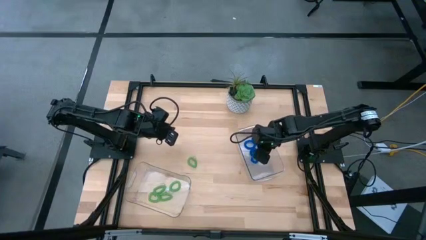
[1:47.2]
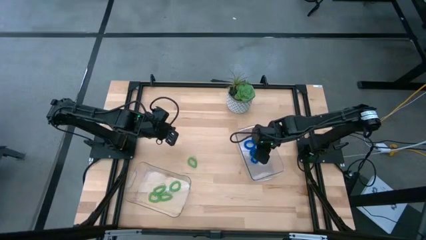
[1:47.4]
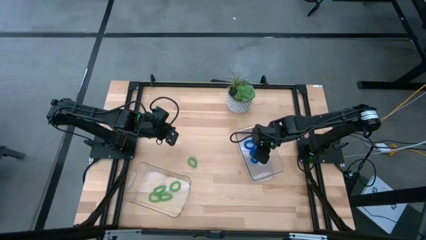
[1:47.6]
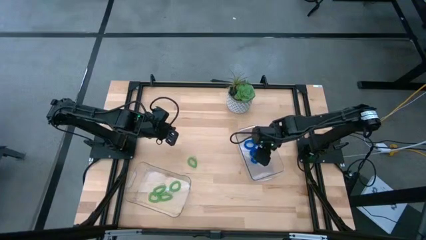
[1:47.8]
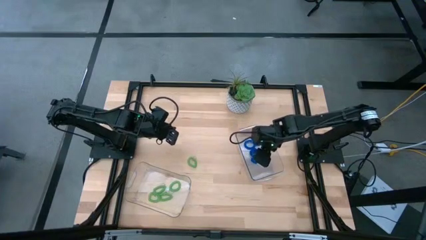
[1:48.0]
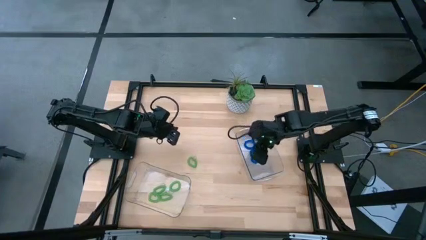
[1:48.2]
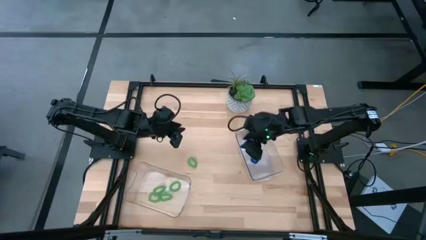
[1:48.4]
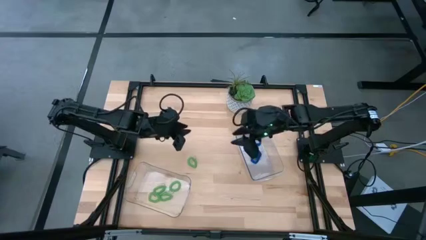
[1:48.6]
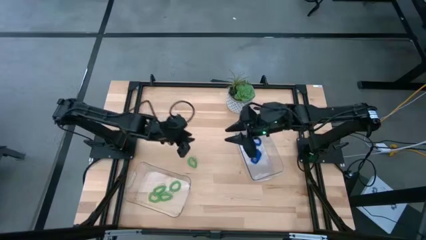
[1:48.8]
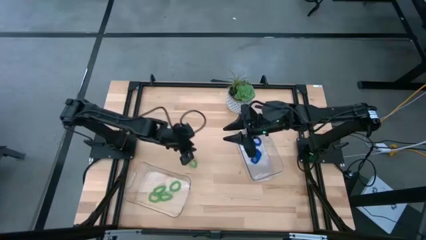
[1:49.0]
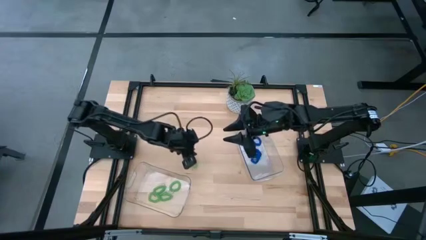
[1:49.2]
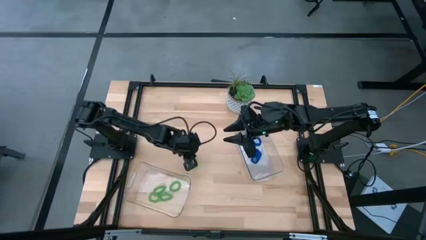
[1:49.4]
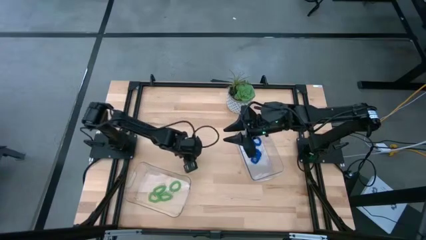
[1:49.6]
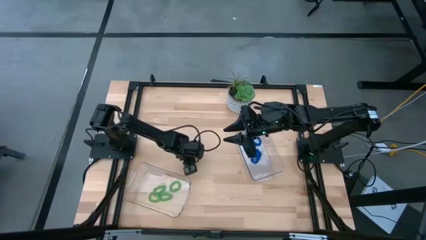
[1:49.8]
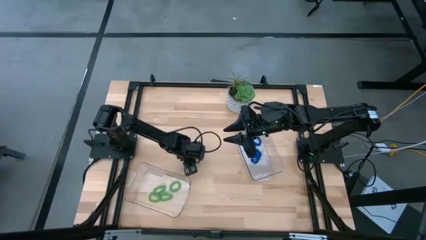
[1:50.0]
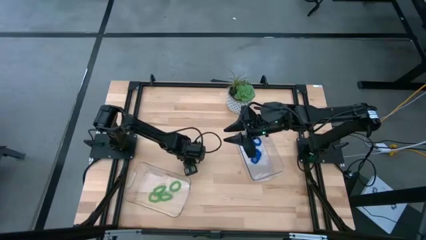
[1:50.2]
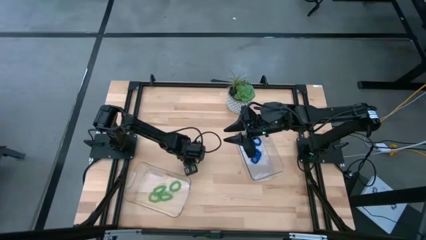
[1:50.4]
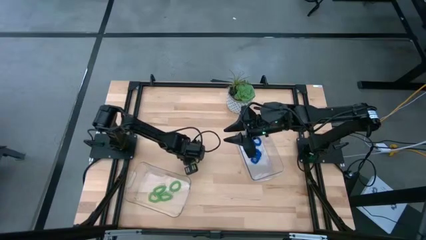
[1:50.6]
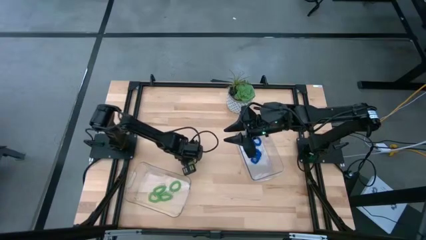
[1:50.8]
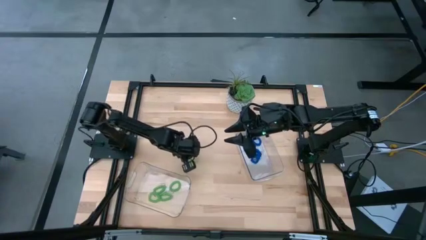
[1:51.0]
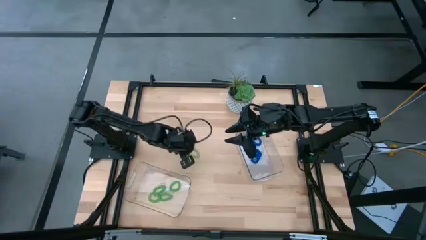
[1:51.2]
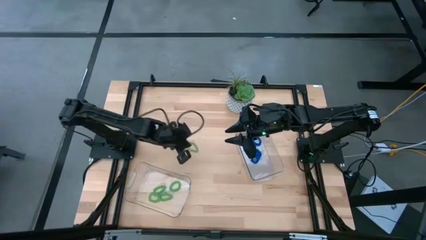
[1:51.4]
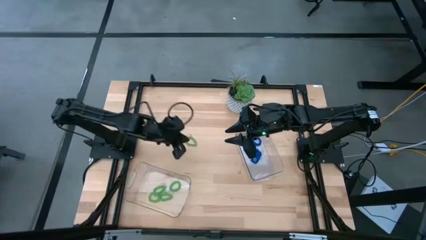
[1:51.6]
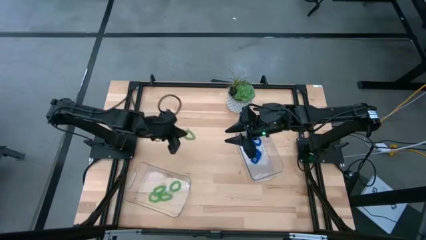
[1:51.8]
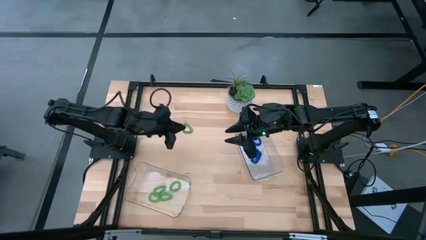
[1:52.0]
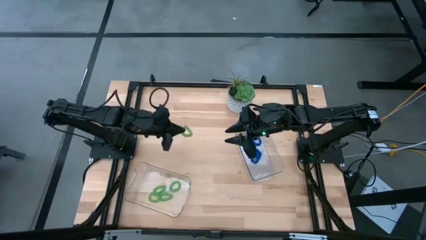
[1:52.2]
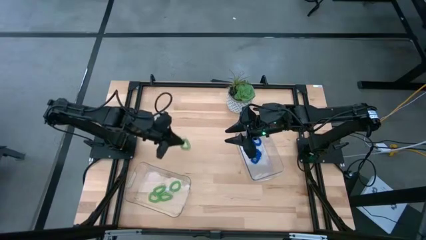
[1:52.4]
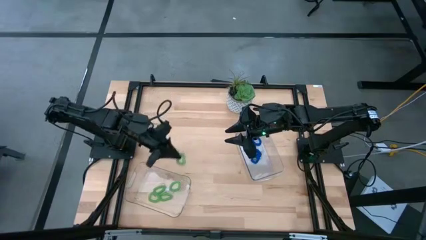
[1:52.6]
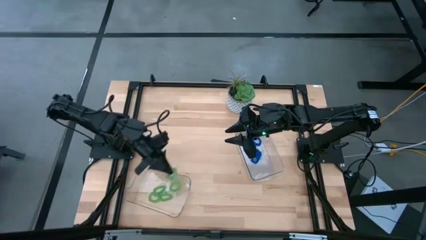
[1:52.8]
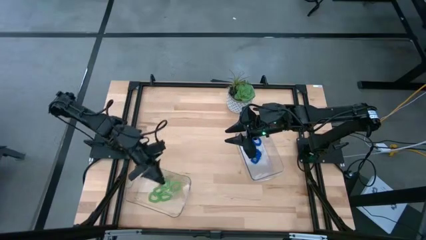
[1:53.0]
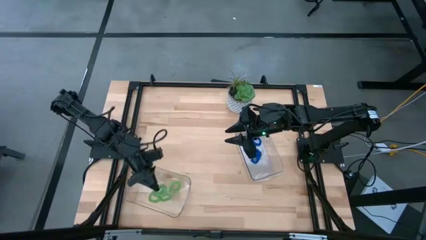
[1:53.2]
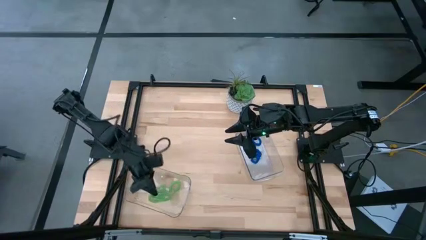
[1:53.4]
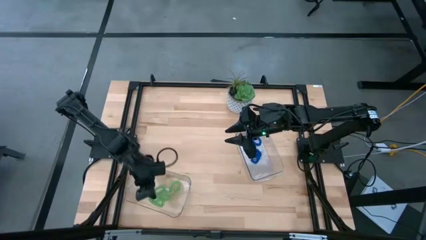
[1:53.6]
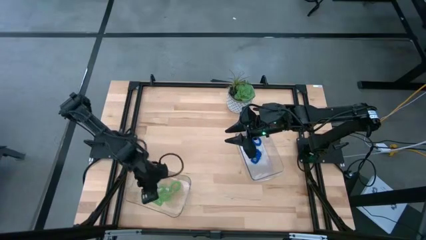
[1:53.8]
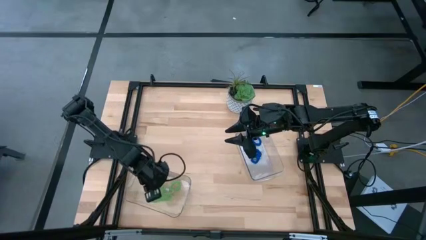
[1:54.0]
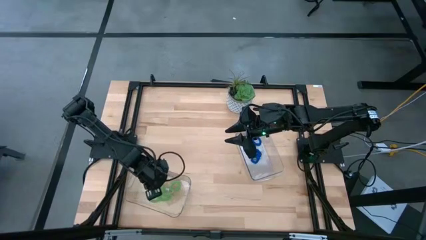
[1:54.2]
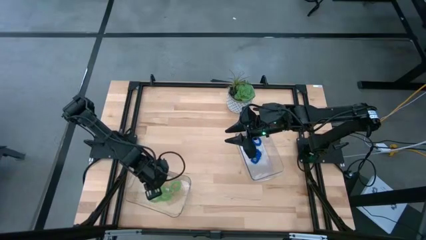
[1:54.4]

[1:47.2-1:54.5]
Task: Sort spring keychains
Put the green spring keychain into the left transparent bin

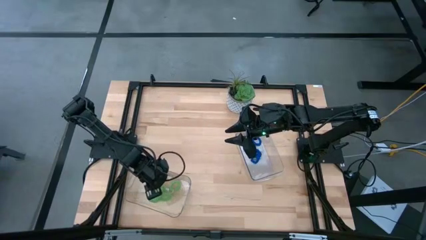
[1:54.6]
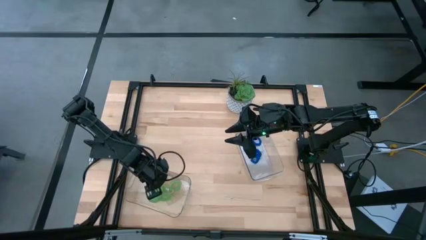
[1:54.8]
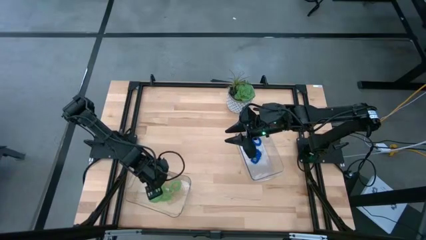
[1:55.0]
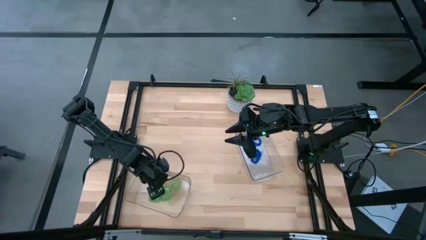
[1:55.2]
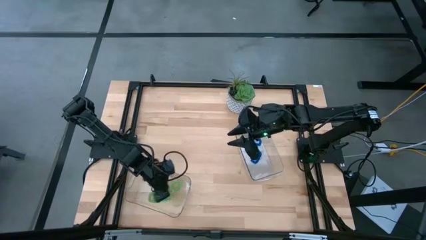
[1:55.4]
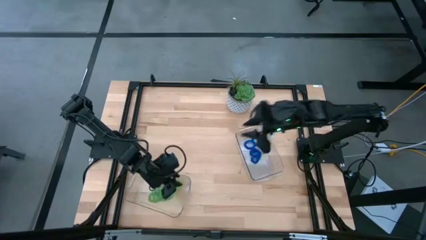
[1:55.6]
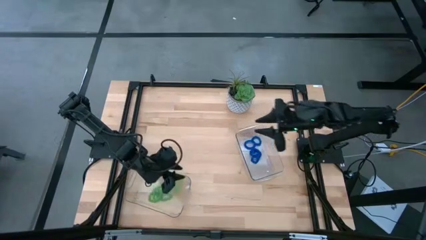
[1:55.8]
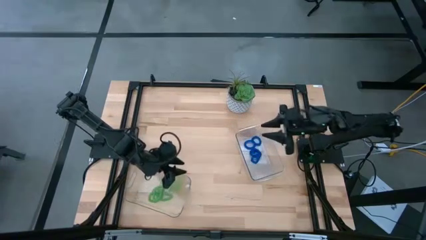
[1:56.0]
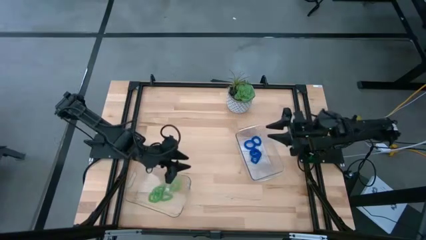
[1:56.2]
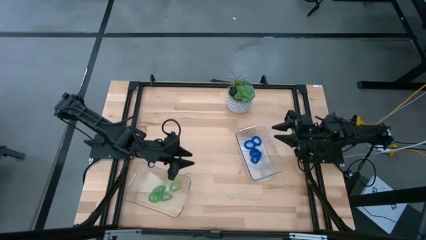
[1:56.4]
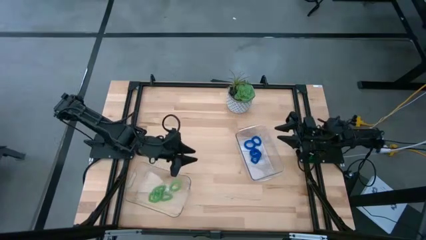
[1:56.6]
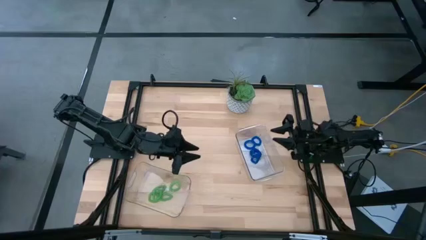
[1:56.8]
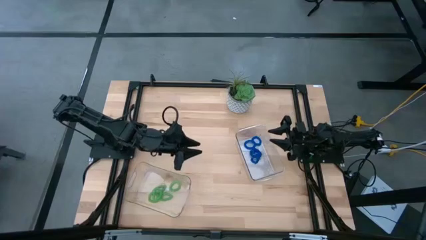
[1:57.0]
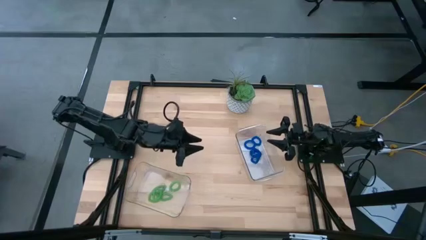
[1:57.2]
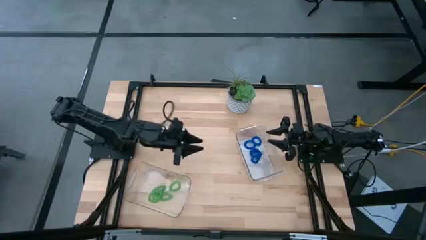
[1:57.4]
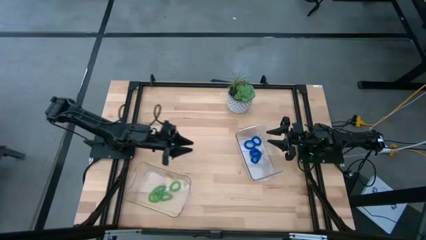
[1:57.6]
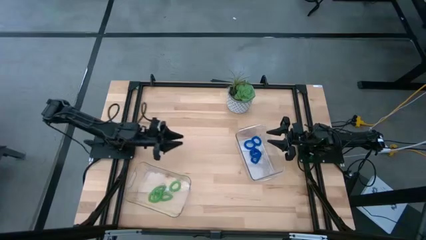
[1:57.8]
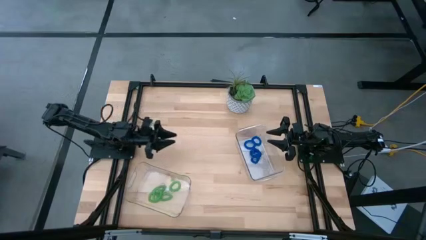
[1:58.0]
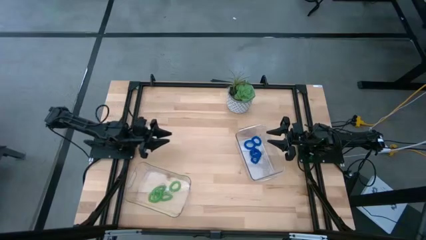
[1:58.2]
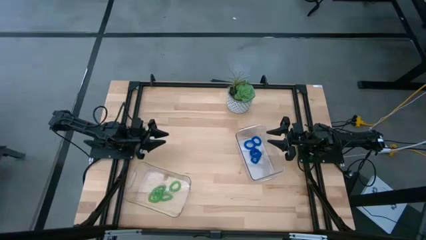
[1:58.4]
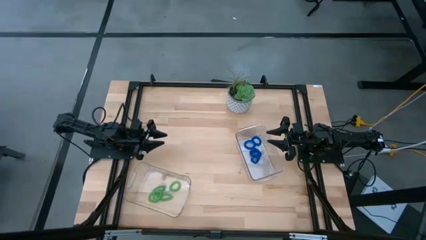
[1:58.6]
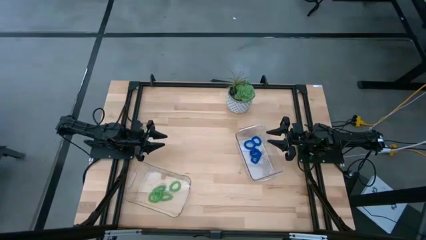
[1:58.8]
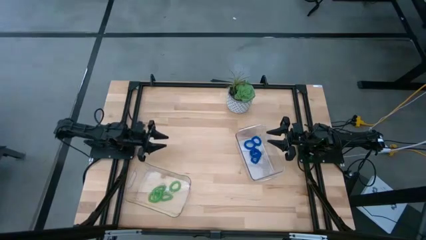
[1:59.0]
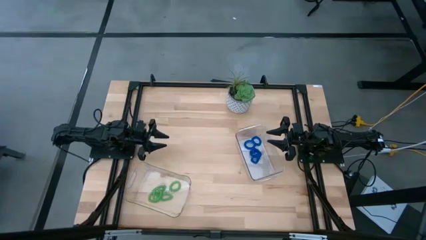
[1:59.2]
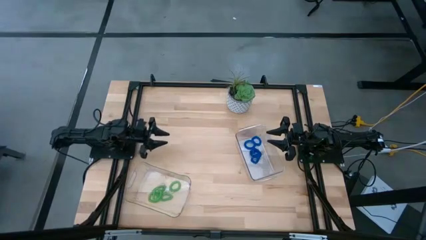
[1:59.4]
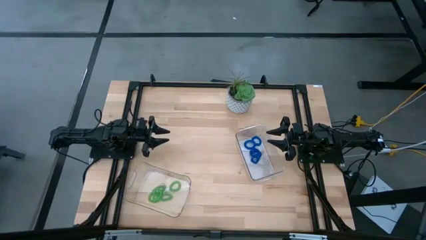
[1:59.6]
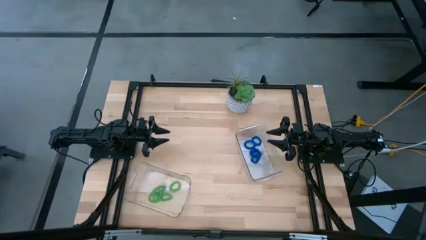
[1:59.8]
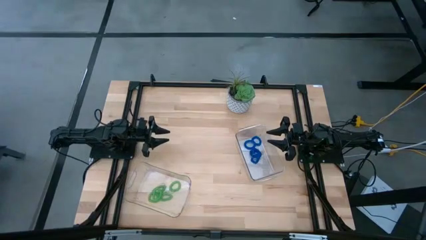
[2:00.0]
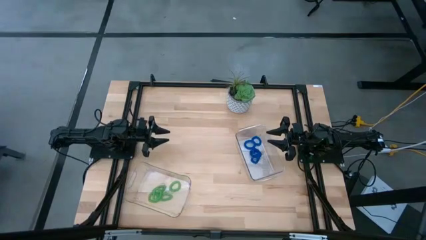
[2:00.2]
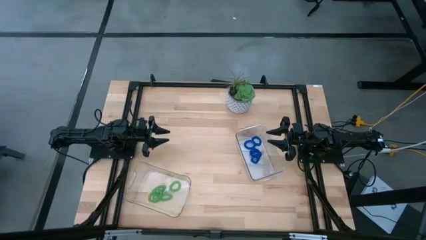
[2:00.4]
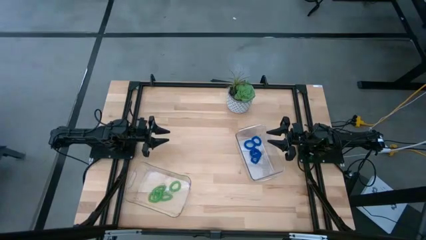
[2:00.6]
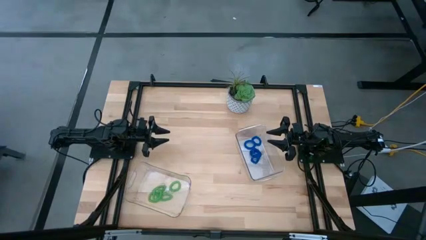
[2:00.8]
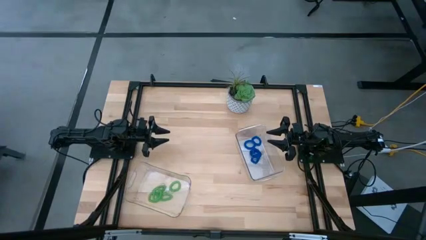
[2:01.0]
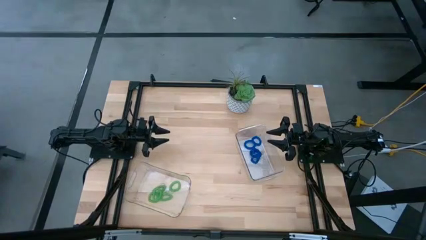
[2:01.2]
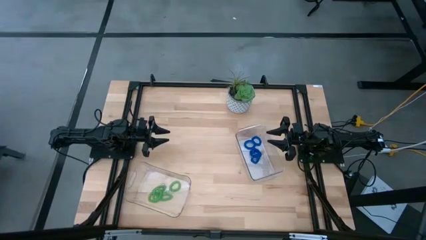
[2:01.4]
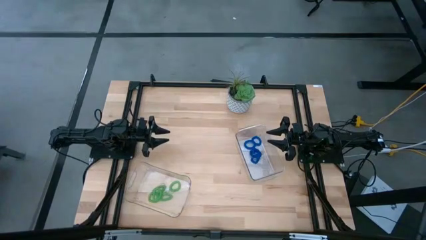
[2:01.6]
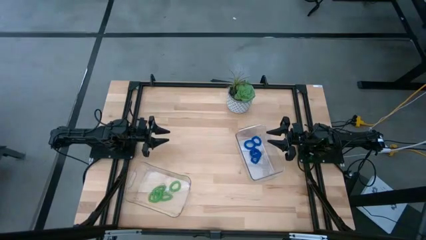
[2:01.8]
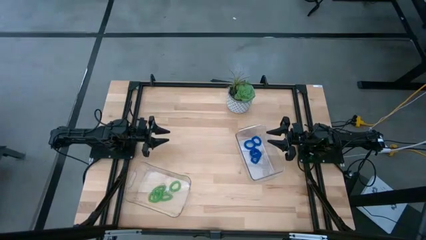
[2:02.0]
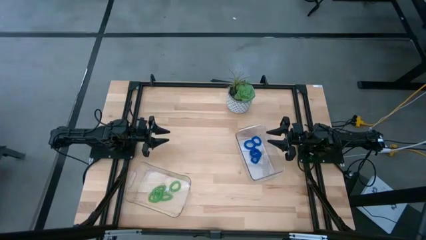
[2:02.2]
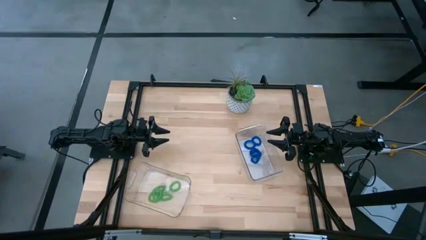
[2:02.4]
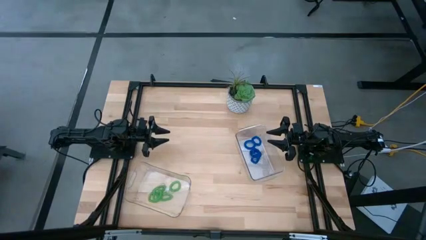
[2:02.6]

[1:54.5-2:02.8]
Return to Home Position

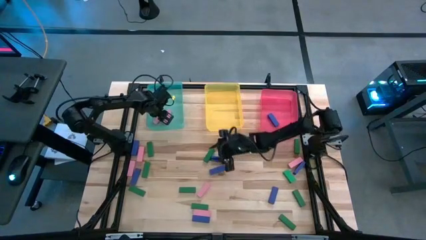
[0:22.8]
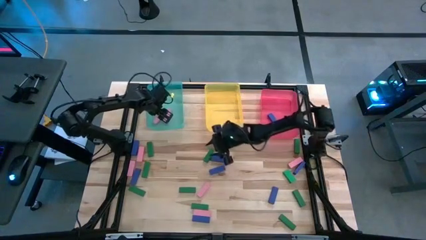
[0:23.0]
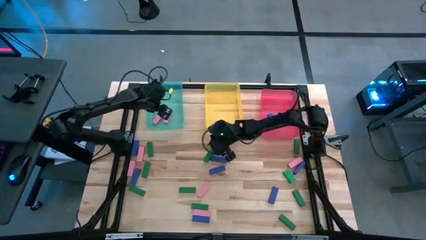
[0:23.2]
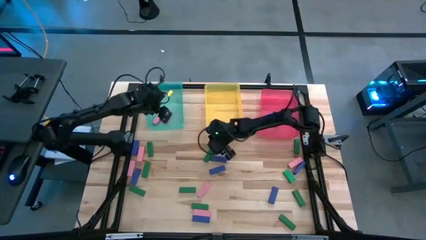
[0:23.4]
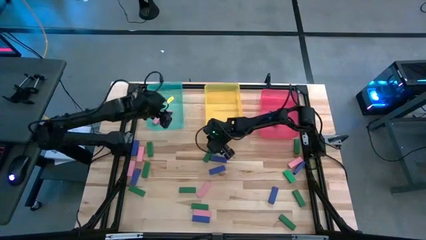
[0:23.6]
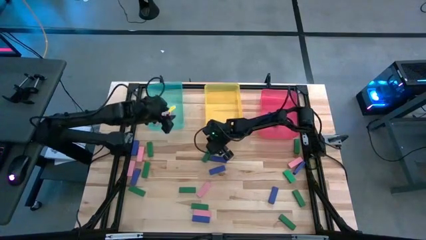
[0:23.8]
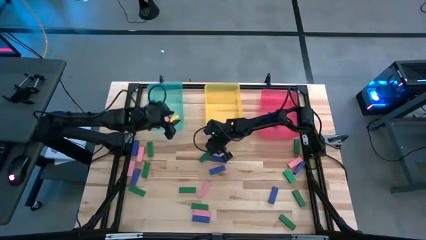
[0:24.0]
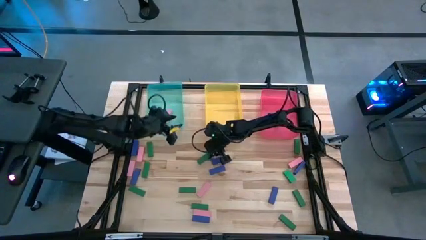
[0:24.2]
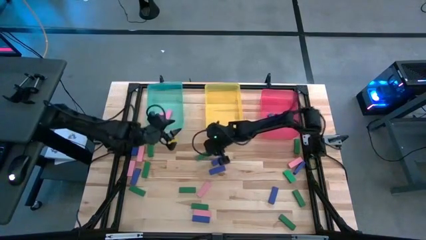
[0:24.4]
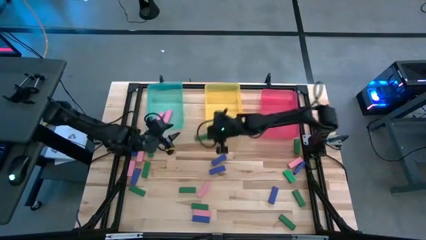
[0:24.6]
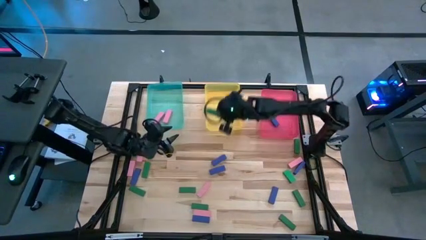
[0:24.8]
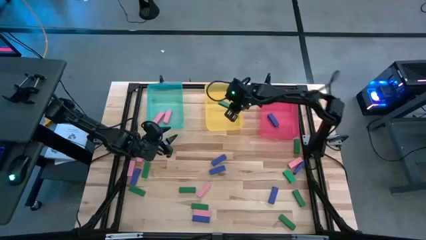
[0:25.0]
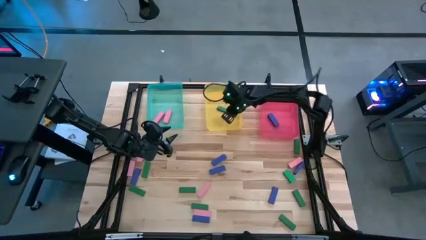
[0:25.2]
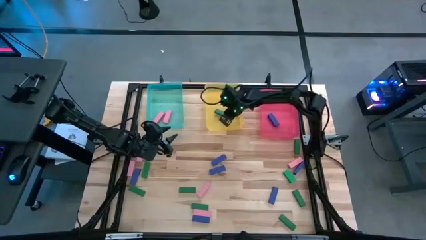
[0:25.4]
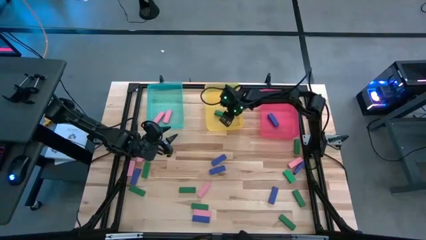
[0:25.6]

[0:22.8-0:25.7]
Task: Sort blocks
Put the green wooden block into the yellow bin
